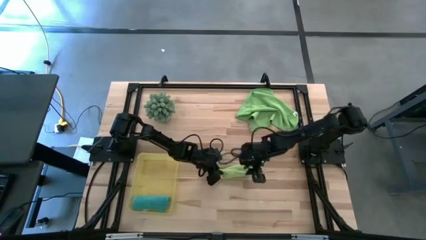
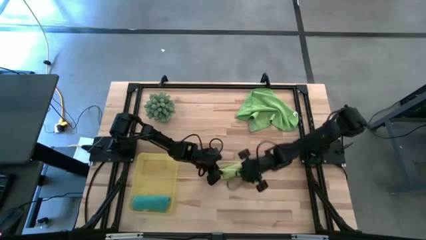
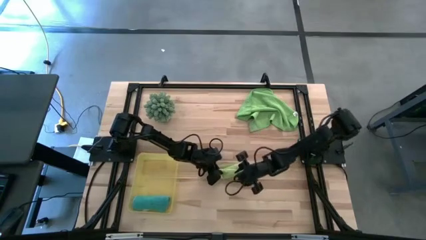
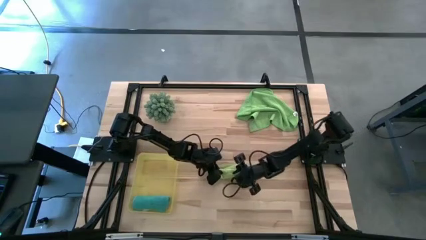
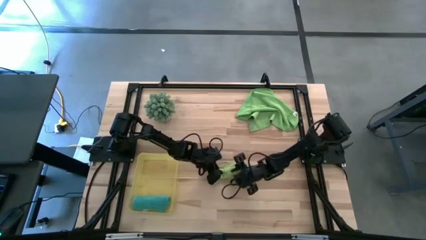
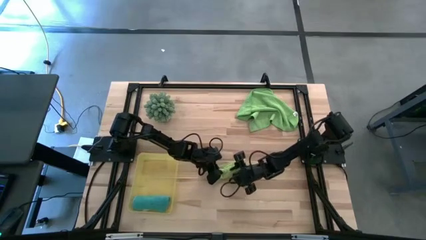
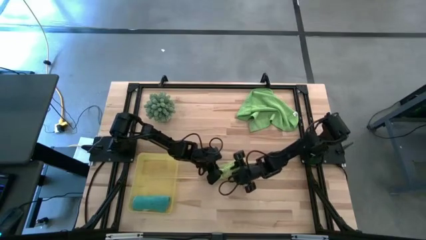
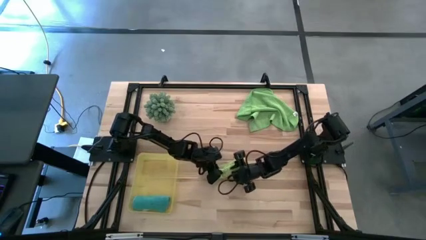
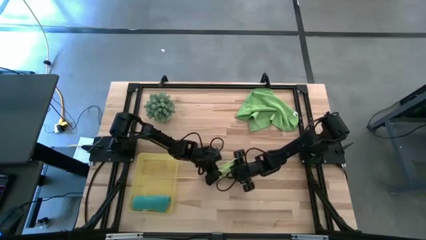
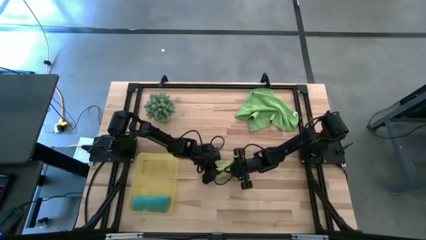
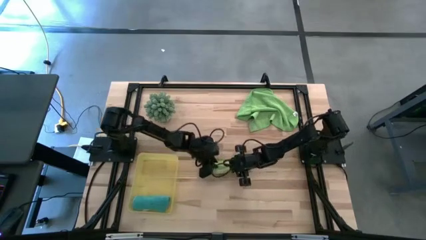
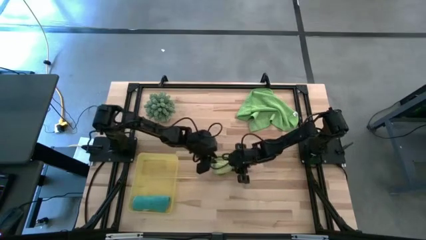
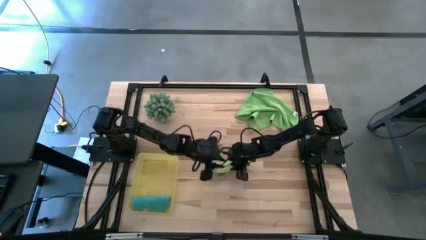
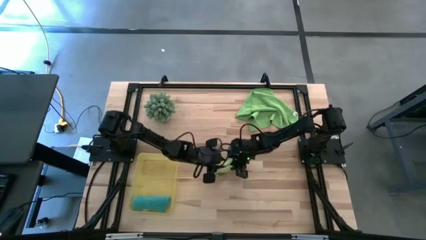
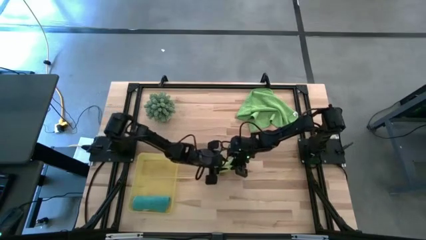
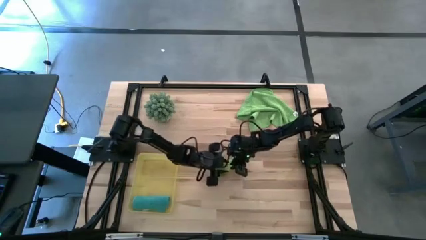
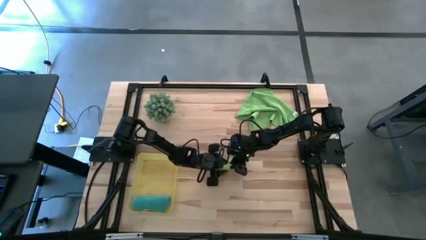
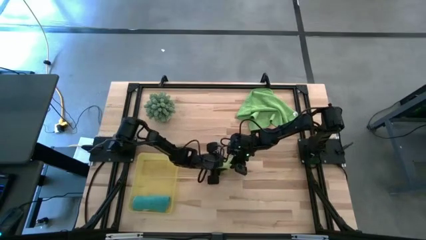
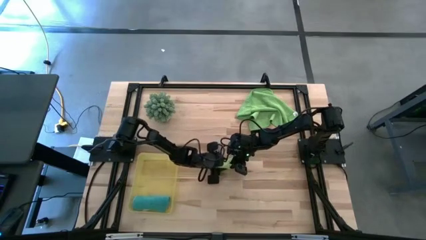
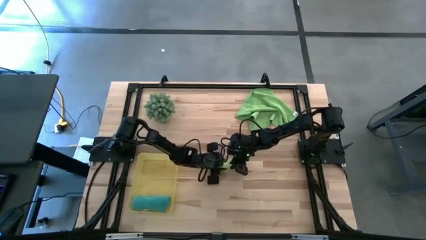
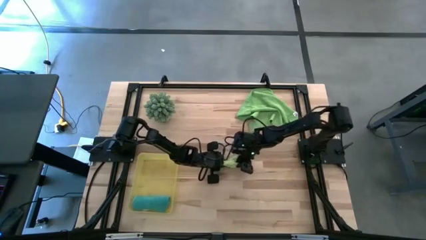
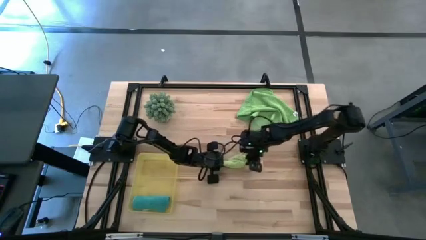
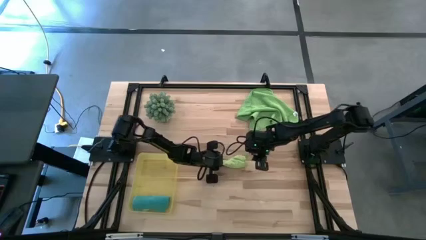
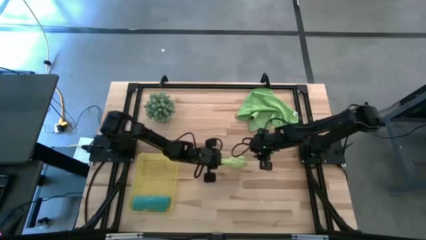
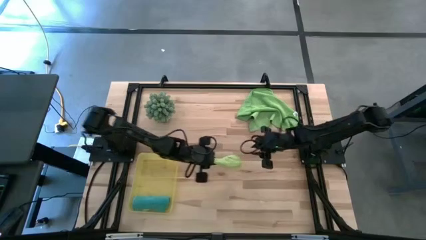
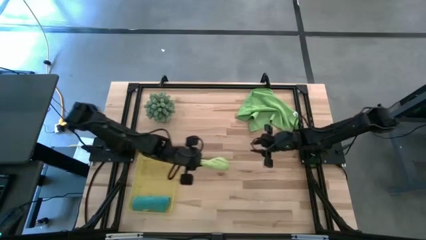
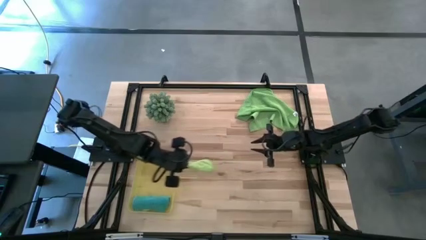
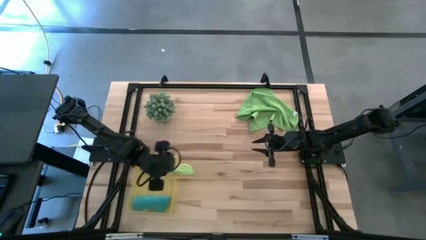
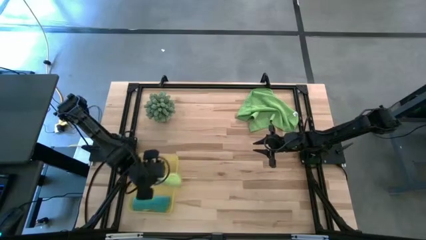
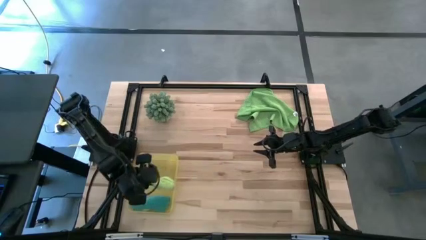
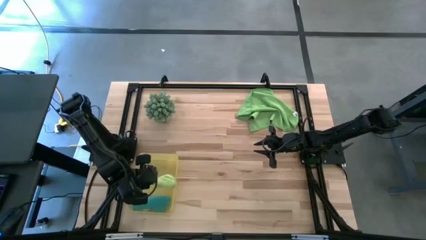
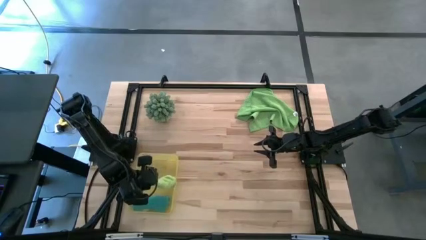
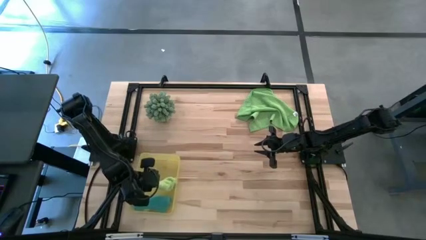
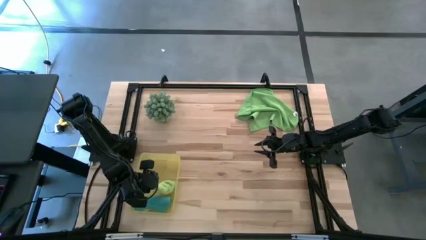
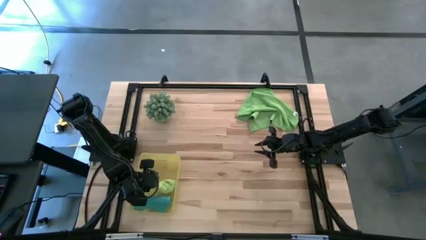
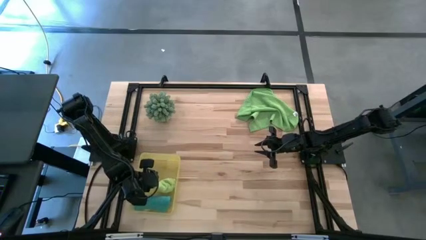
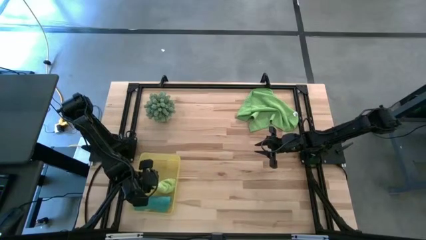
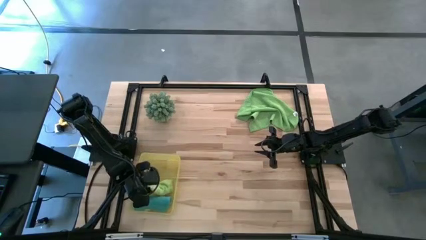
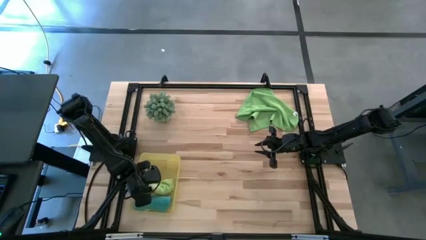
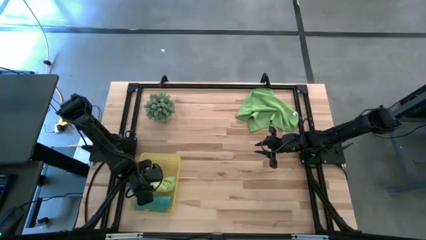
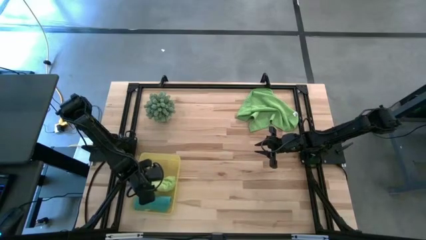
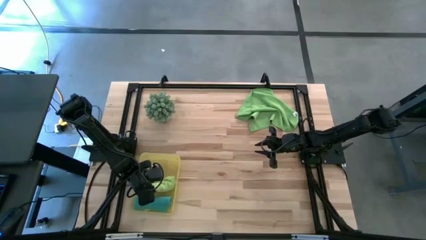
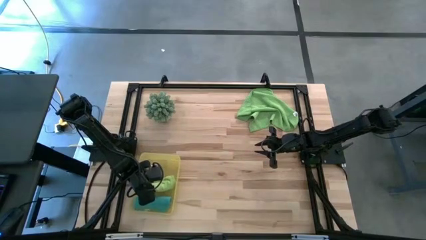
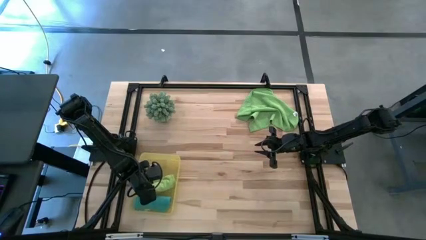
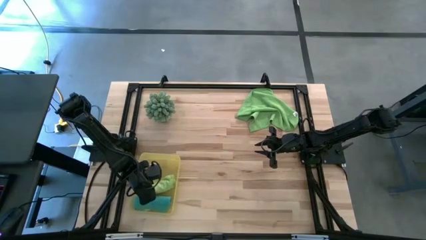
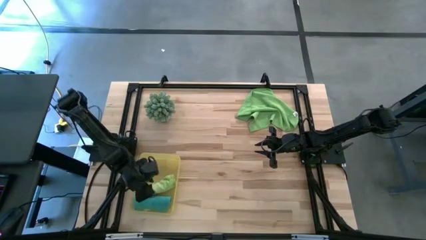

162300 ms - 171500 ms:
Task: Roll microfiber towels into tight, uniform cylinder then place into a basket
Put the light green towel into the yellow bin

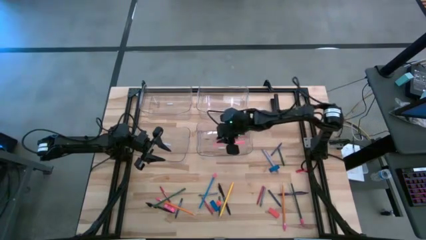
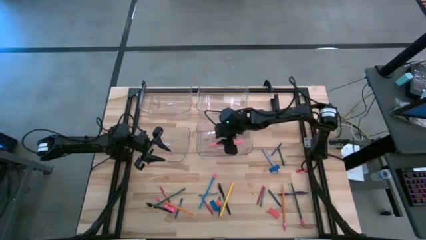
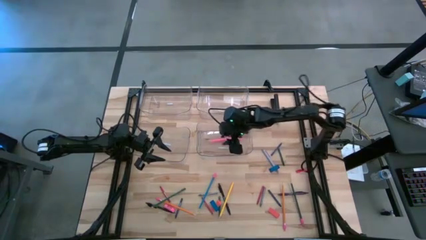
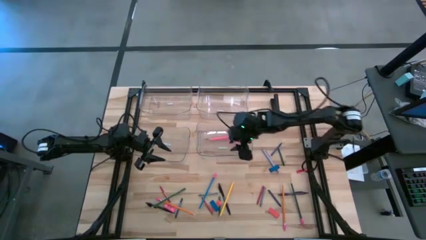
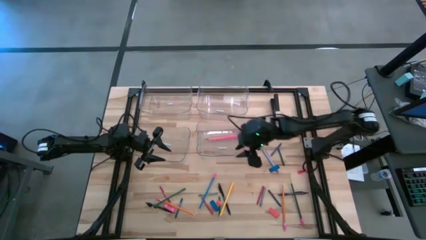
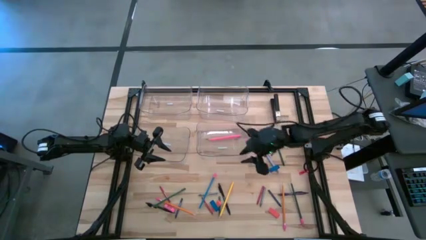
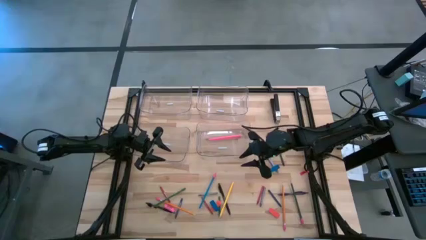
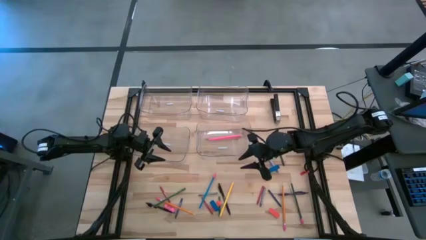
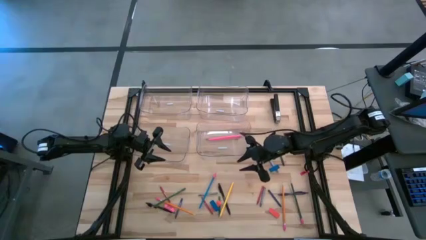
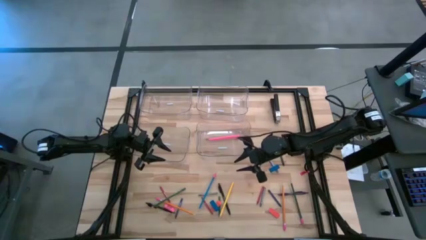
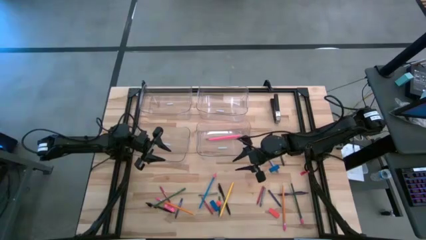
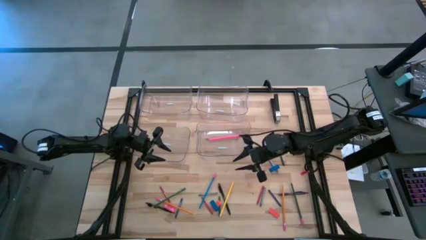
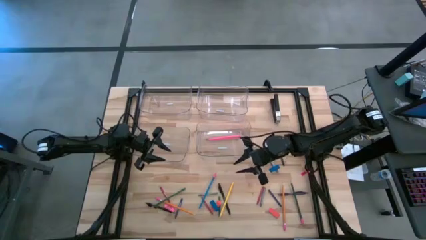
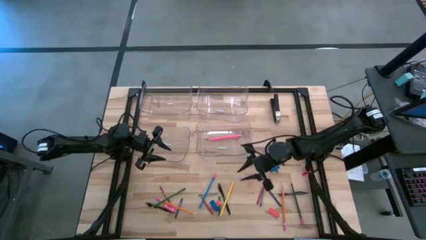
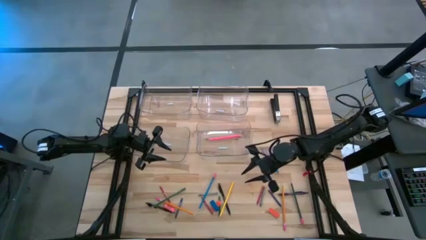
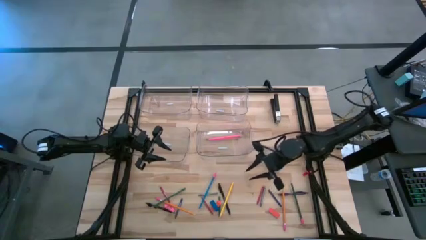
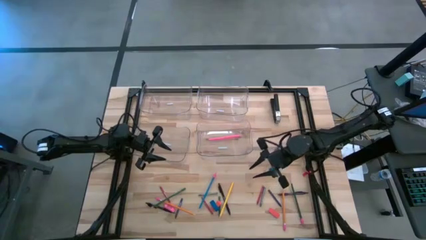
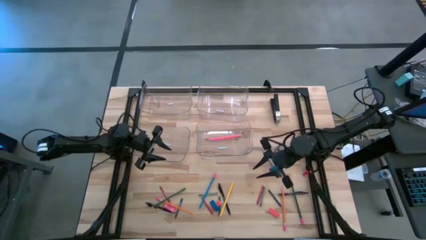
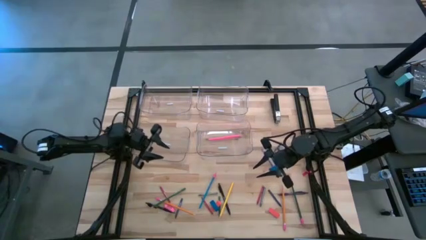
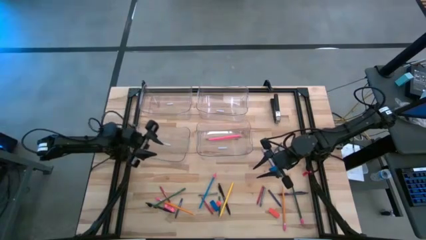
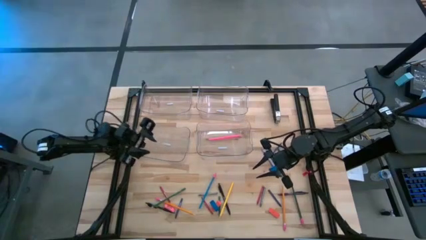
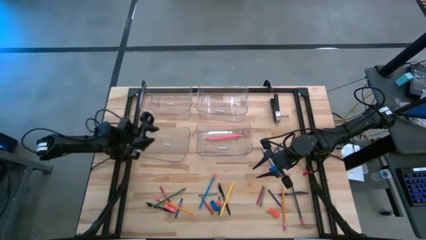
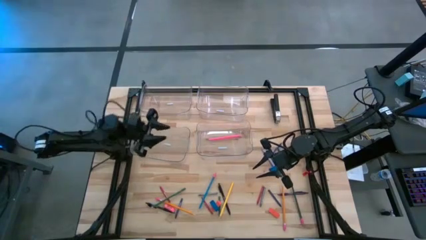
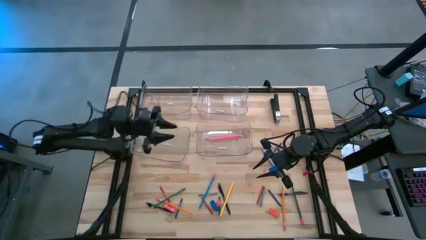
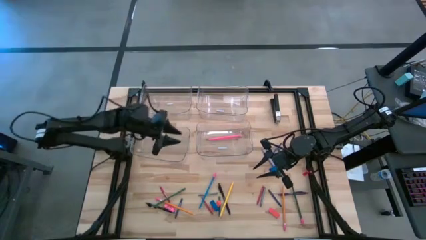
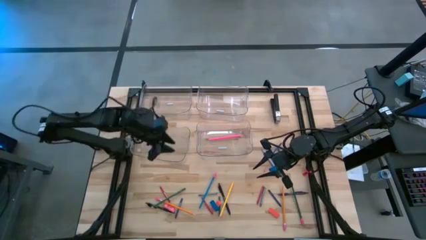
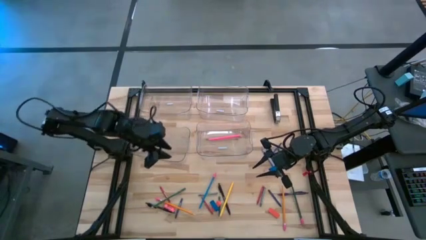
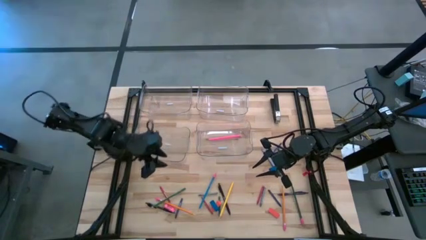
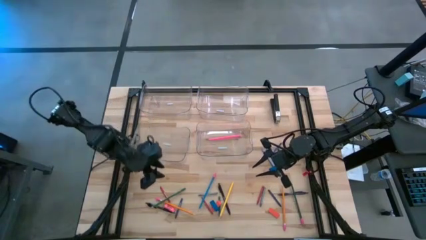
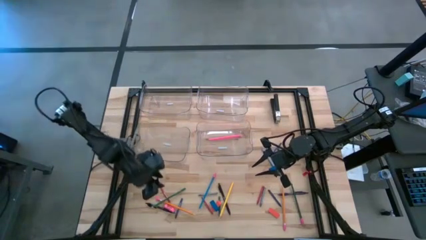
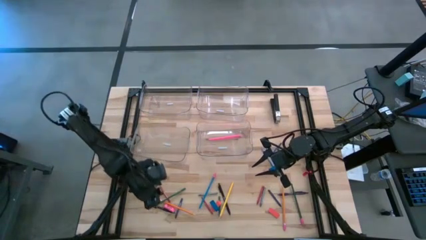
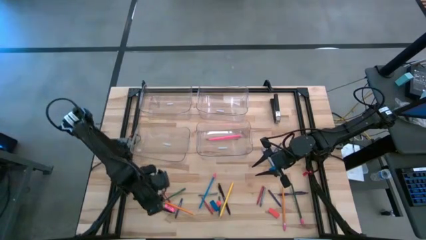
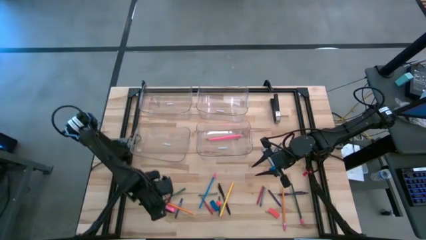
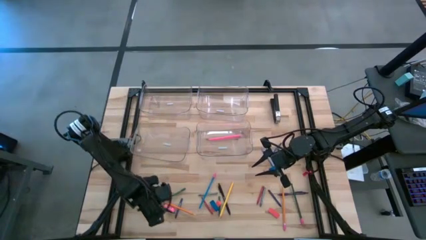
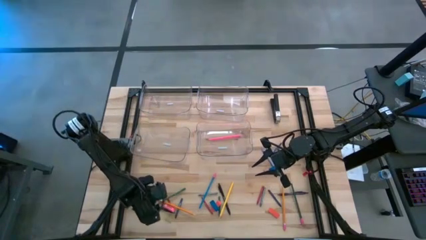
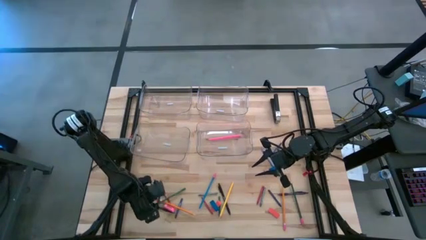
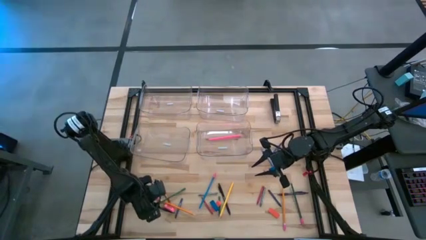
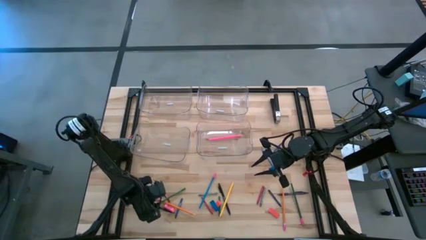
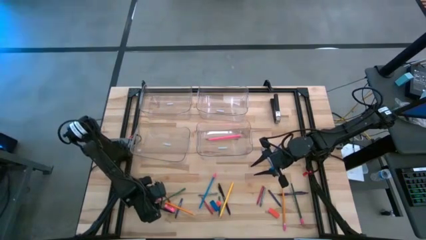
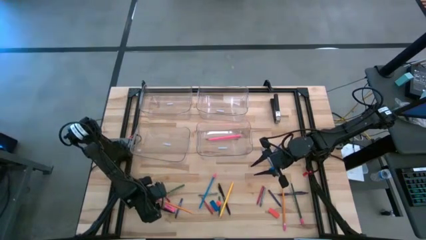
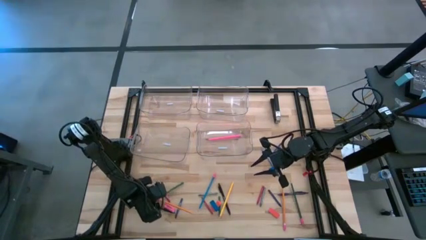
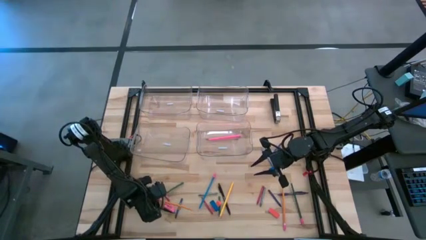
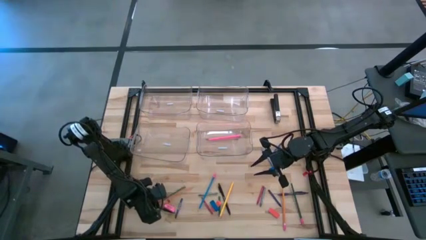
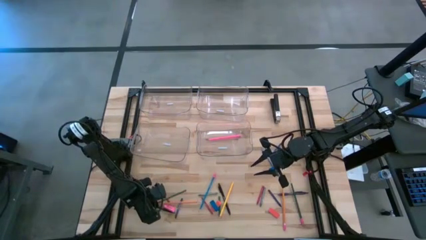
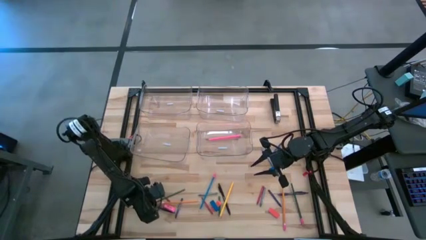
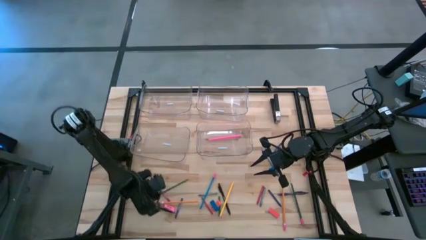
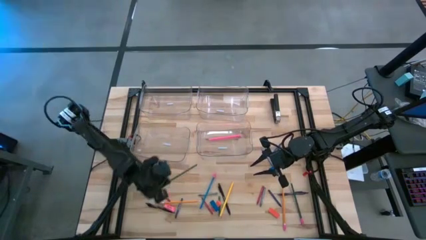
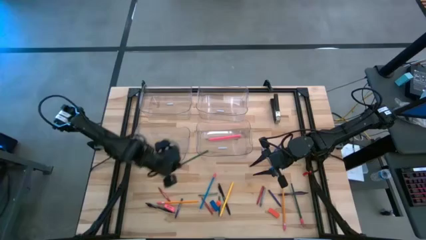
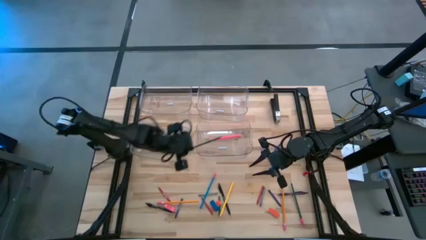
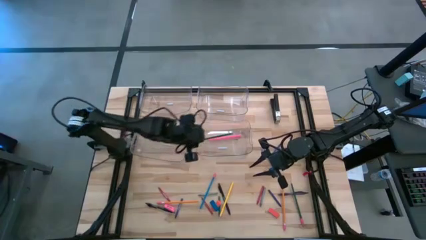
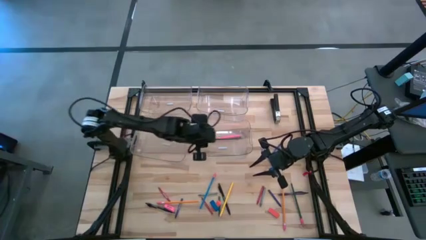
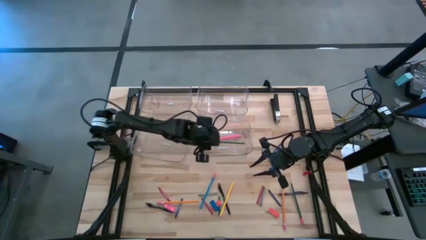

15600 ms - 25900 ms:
Task: Sort crayons/erasers/pens/pencils in bins
Put the left green pencil into the bottom right transparent bin
